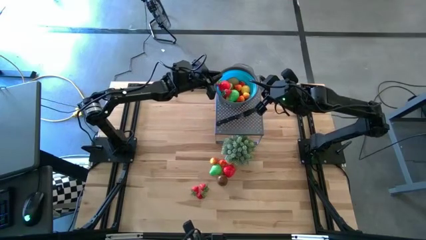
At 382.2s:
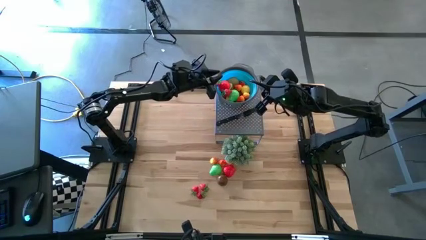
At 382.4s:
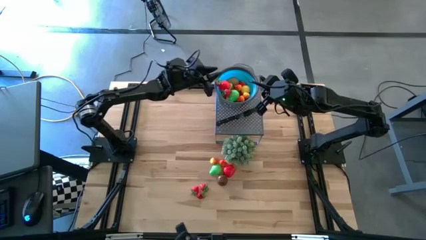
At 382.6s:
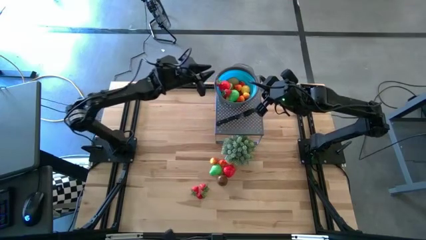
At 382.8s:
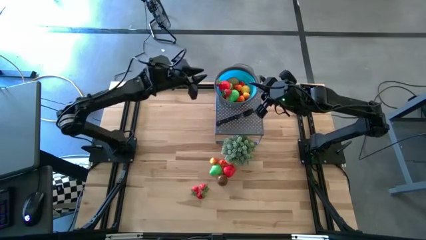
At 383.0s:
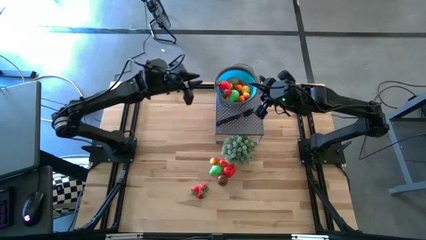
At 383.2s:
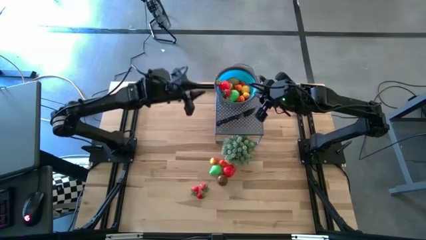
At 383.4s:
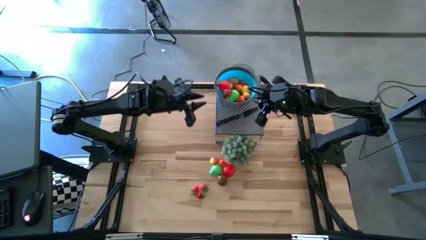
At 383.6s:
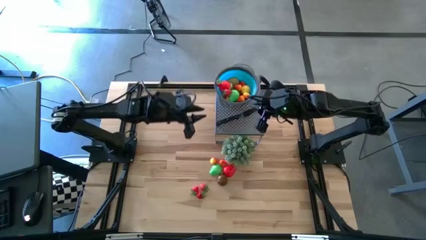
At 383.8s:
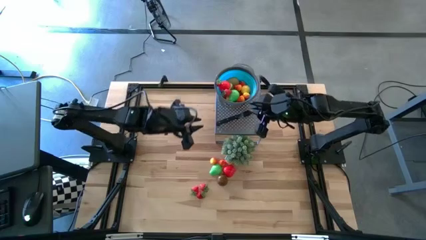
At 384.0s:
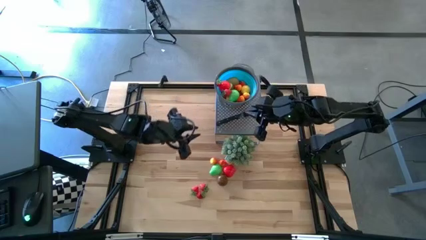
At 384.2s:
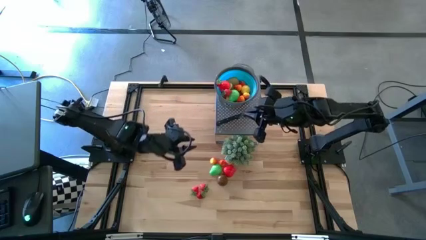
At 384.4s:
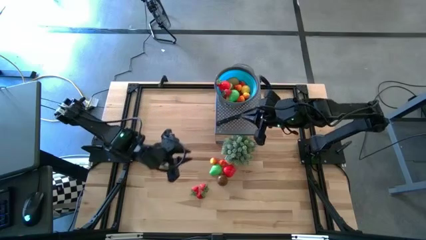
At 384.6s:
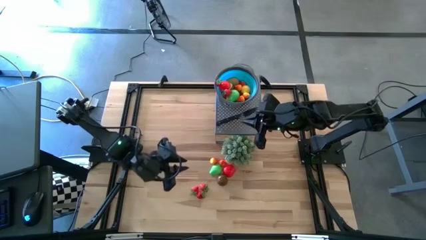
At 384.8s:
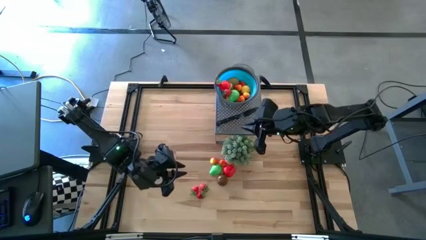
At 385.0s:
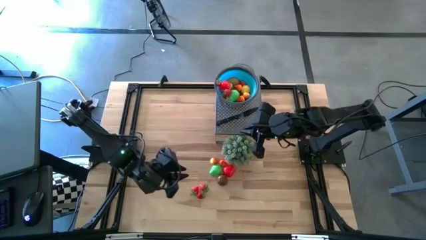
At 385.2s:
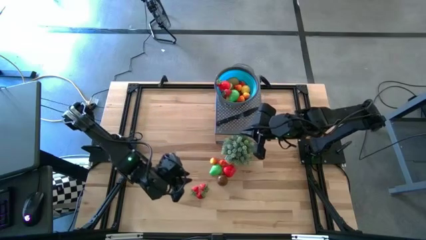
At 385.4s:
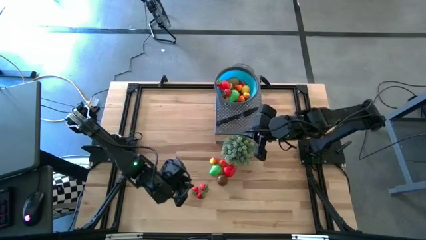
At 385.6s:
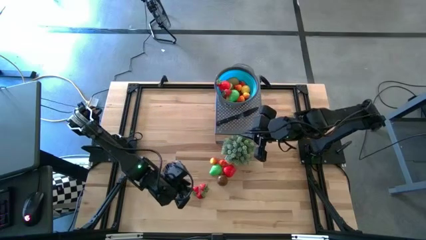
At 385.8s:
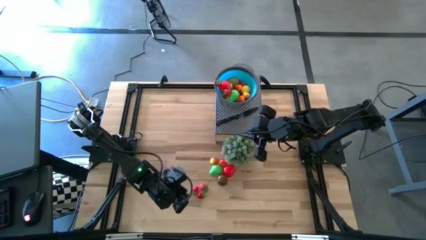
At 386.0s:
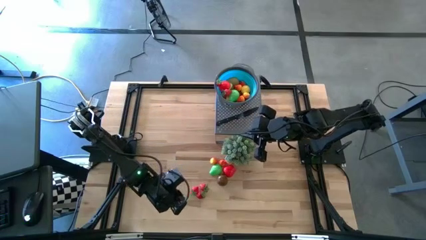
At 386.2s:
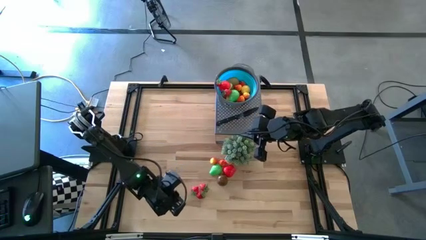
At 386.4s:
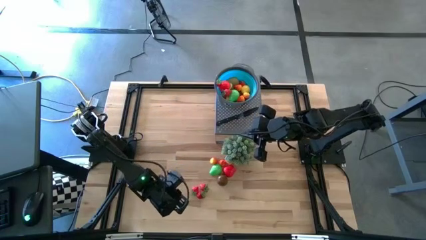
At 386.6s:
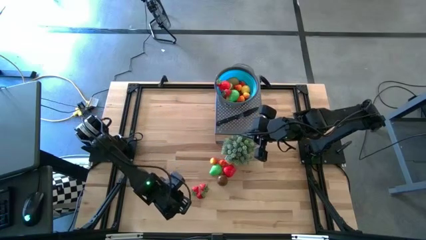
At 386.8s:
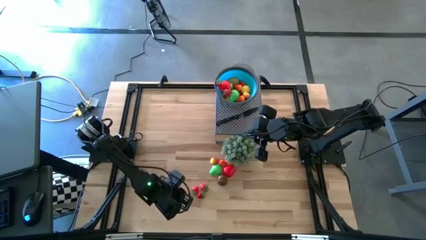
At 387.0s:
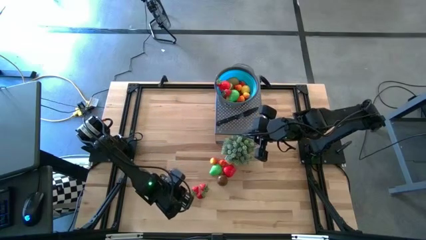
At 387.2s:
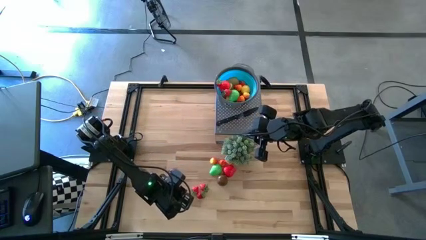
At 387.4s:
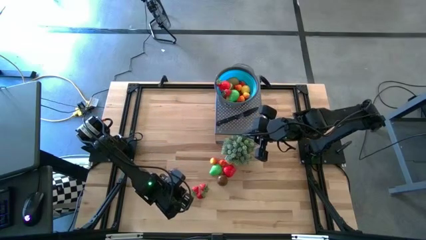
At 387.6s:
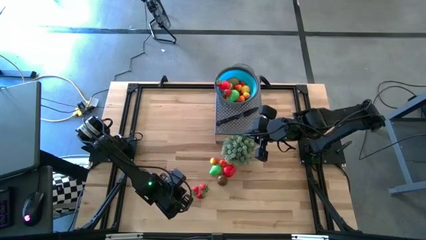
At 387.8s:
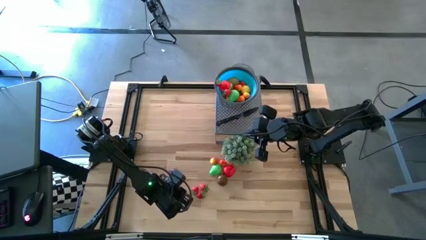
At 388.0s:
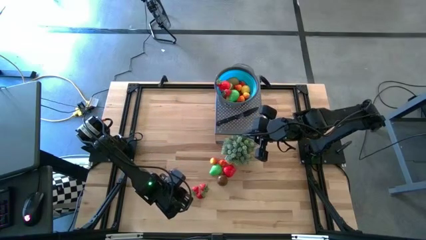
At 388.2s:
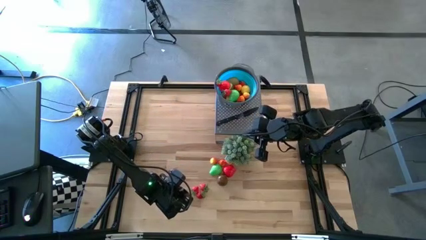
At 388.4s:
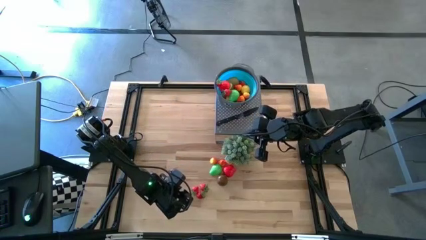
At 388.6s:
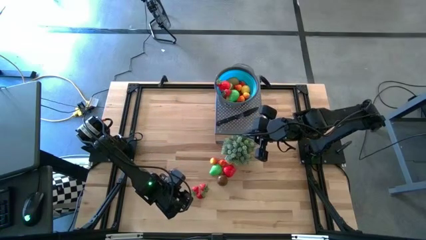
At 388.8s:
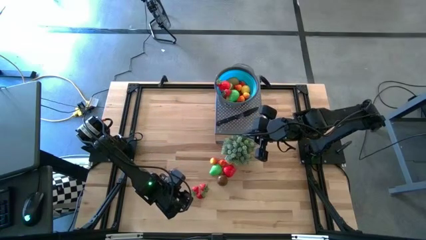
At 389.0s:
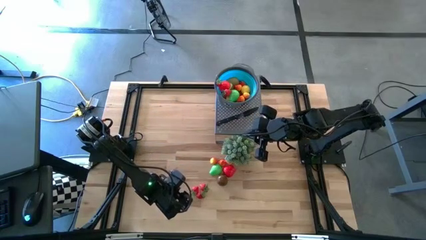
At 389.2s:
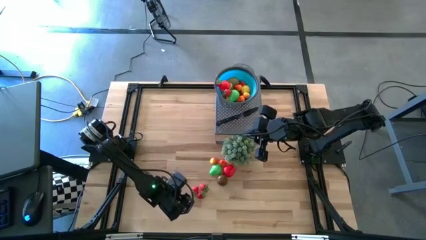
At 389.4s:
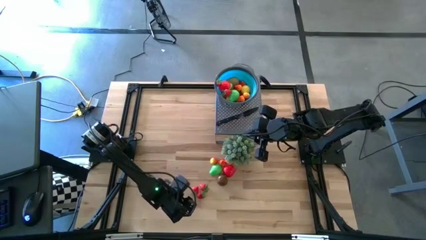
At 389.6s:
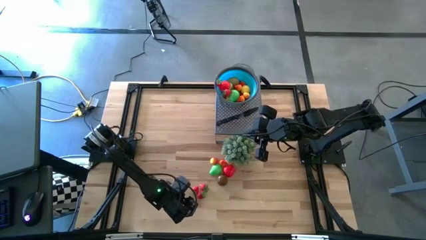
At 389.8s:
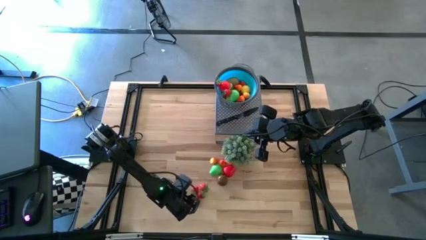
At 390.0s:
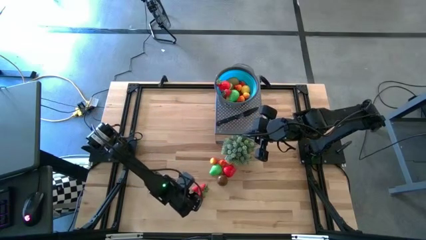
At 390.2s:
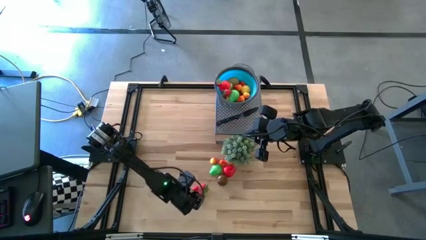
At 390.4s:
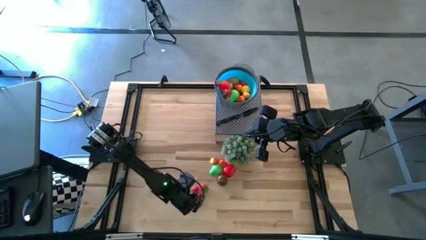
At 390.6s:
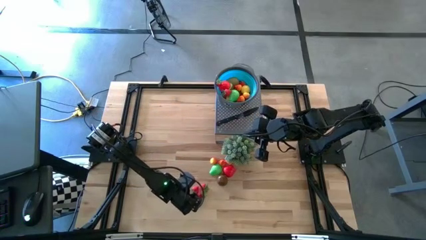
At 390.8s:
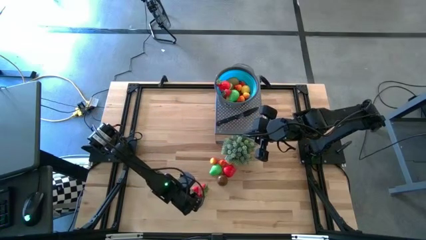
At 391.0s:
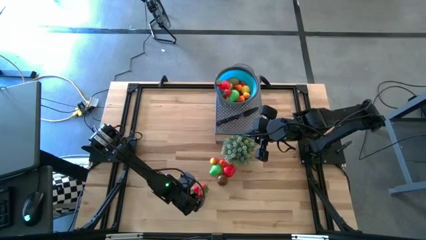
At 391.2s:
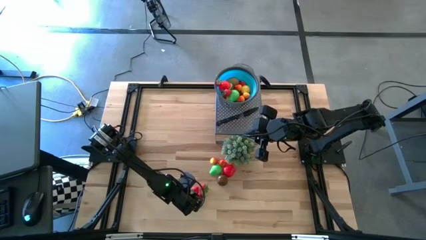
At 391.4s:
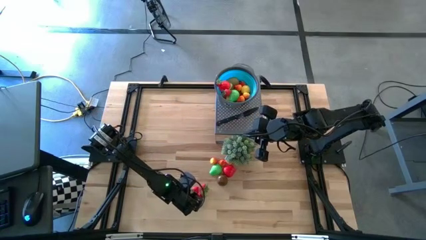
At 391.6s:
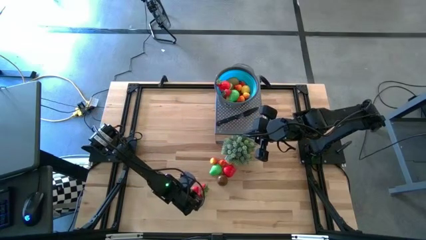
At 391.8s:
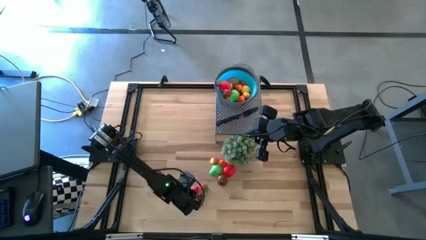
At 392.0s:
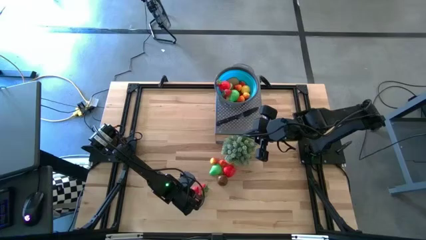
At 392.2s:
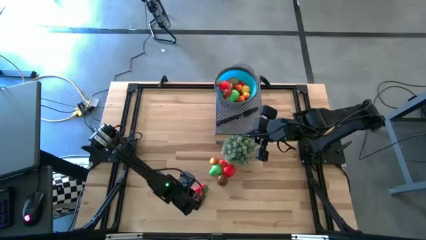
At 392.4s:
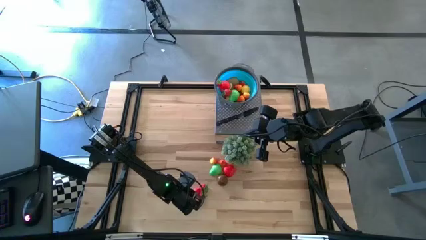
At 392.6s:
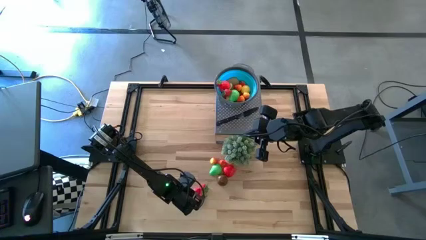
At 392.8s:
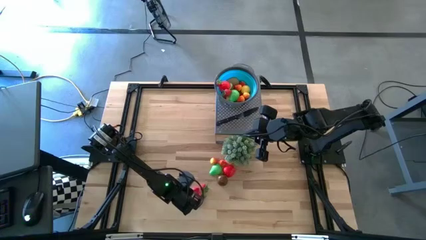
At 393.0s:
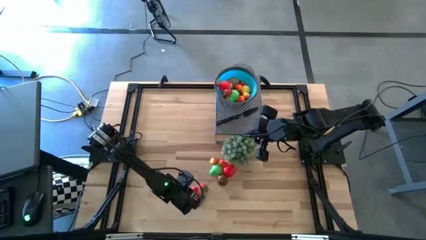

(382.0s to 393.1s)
Task: Pick & Place Fruit
Put the red strawberry into the blue strainer bowl

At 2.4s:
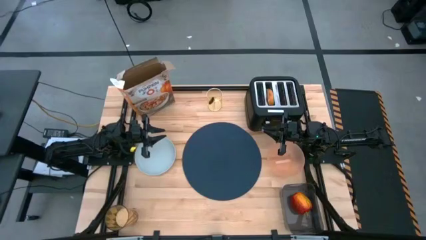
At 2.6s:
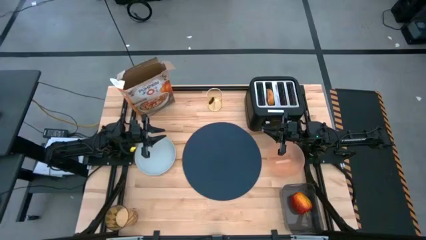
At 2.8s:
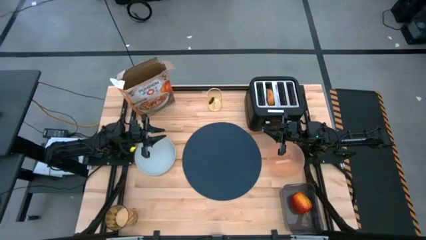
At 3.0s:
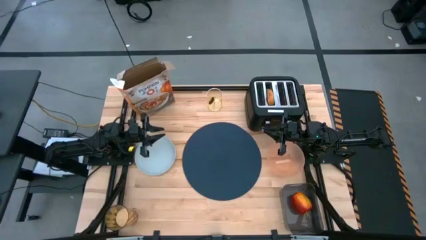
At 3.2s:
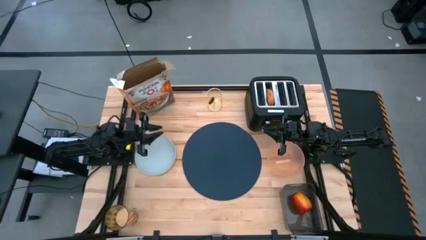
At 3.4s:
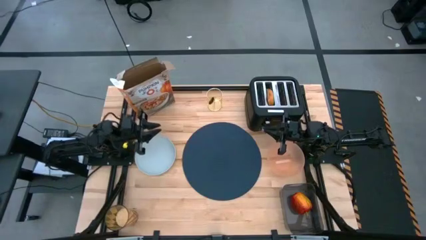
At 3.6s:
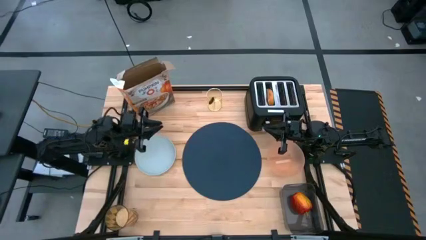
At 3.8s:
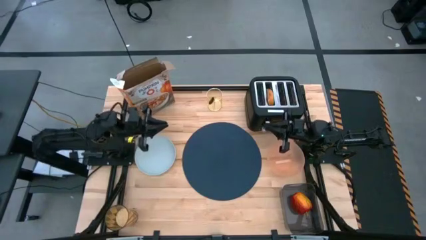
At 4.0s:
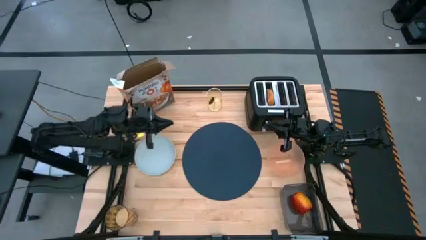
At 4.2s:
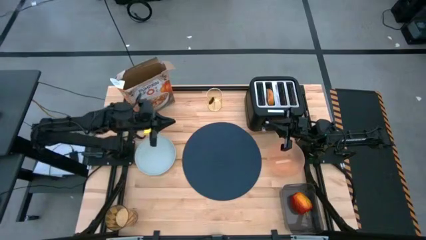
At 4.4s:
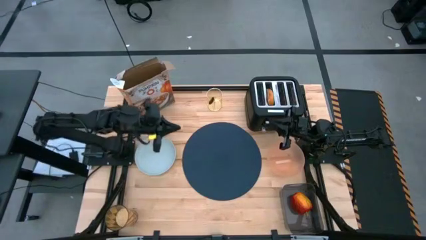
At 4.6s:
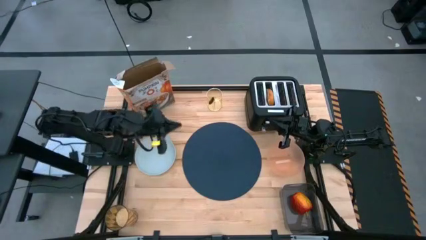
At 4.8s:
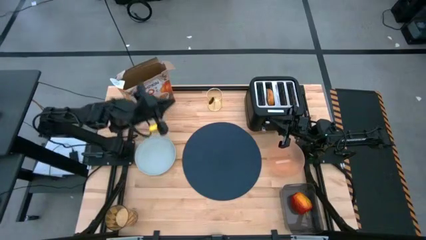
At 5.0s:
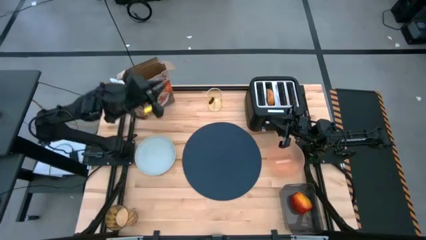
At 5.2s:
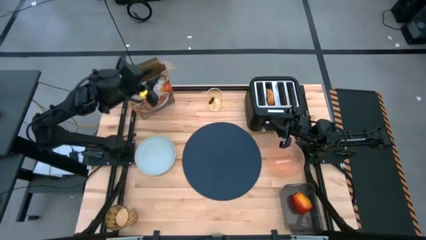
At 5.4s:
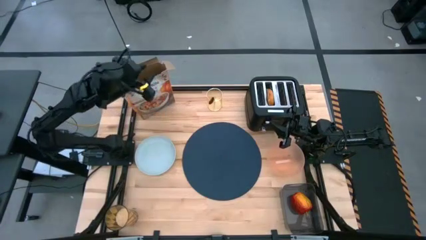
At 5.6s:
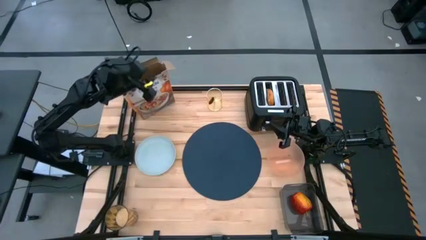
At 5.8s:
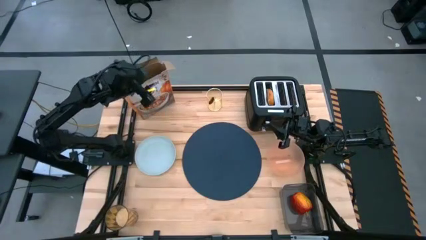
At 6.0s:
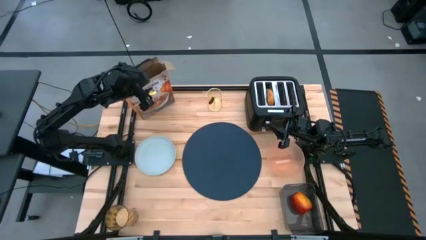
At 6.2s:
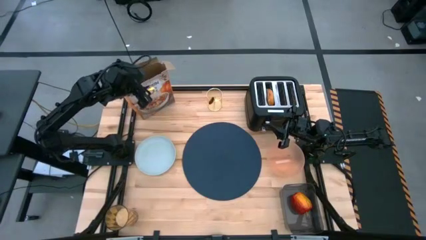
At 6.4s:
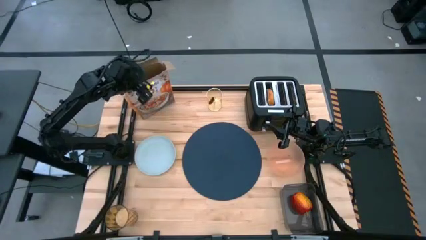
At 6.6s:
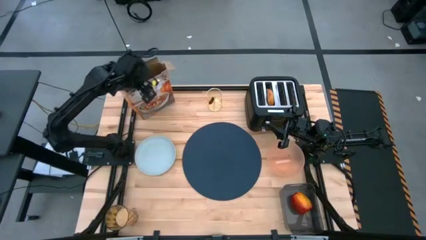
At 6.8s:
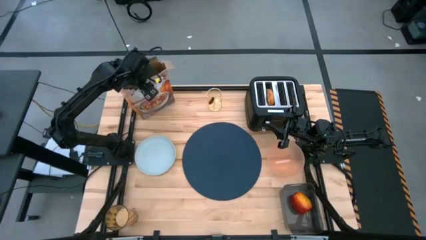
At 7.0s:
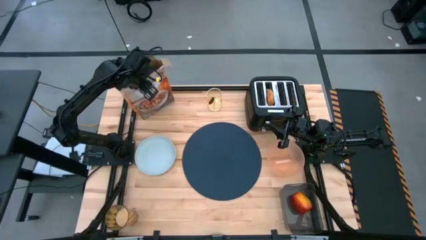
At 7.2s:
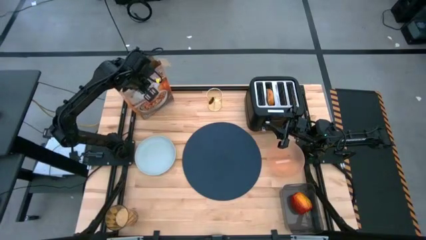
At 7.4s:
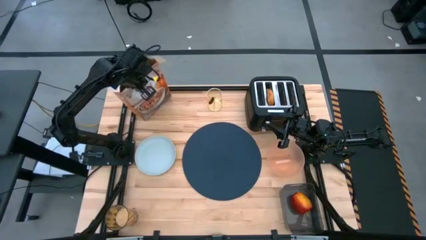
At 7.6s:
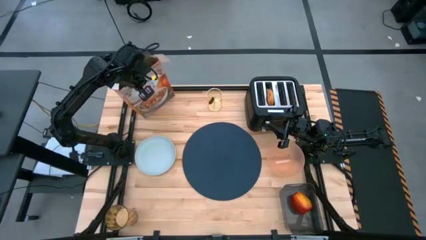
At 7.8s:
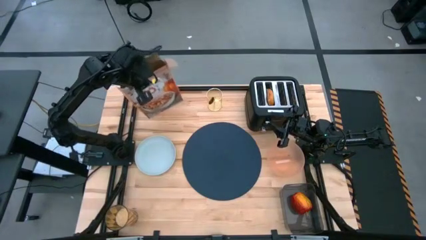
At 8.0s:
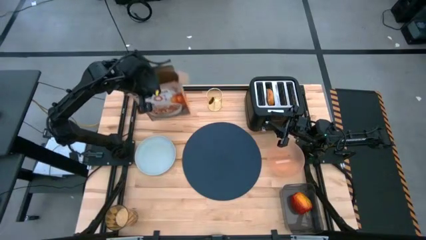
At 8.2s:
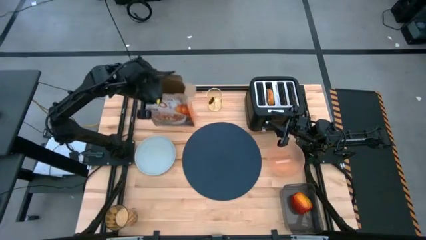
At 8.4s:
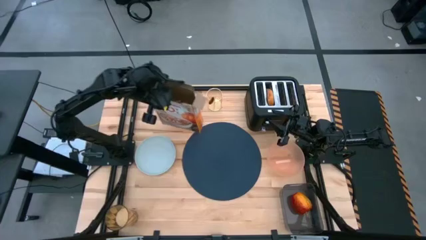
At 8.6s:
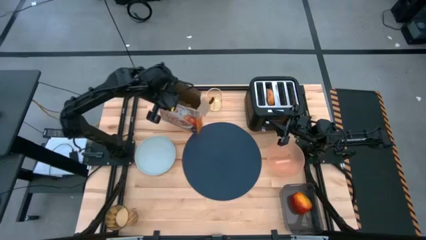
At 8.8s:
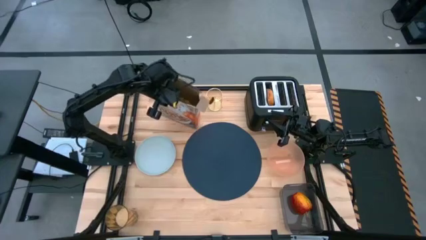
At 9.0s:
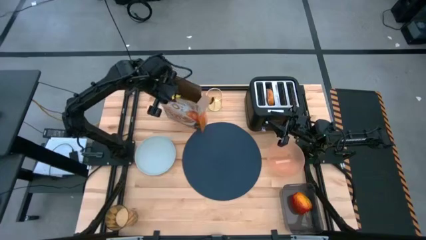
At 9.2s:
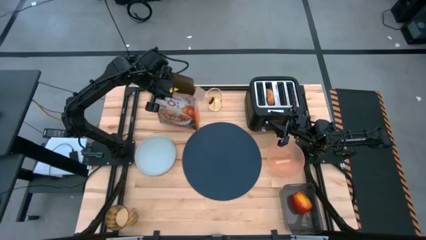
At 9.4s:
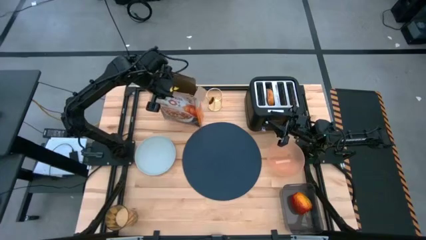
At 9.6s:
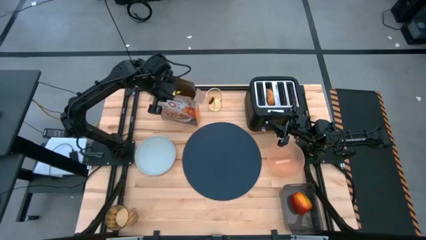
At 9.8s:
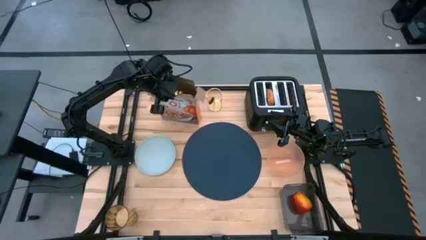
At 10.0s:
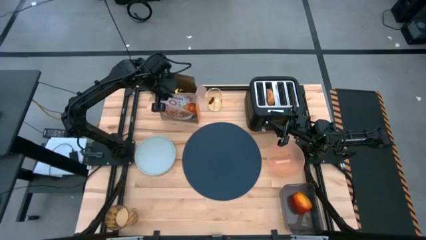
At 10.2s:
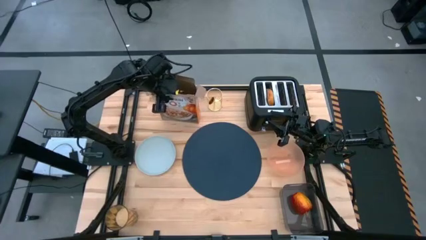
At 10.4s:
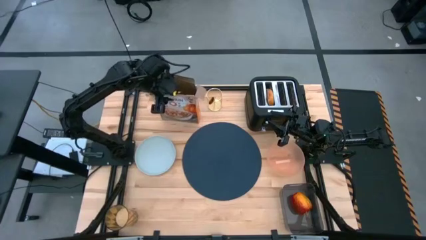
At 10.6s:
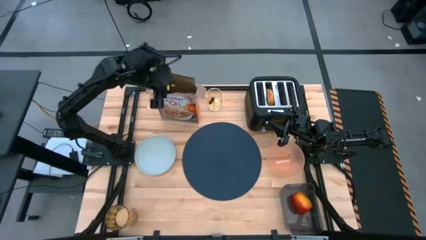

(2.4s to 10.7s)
Task: Arrange a breakfast setting
Adjust the cereal box
